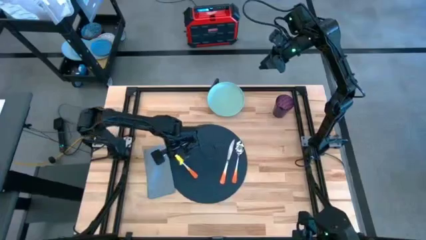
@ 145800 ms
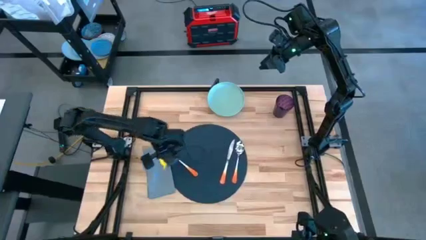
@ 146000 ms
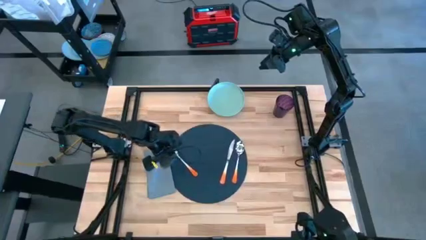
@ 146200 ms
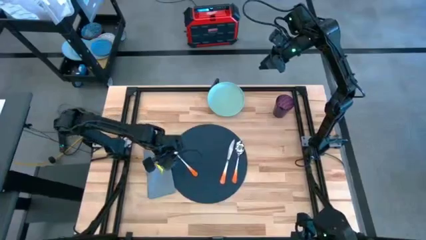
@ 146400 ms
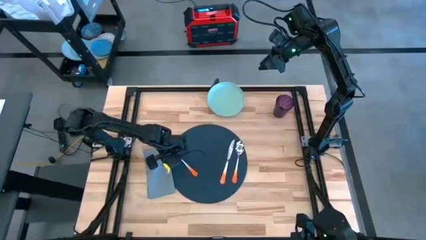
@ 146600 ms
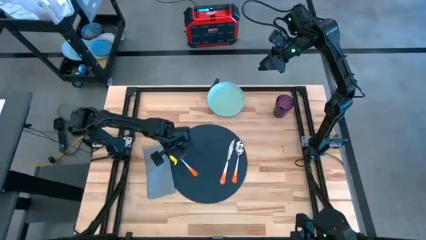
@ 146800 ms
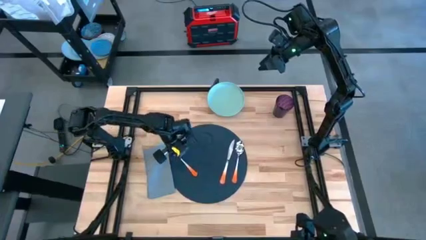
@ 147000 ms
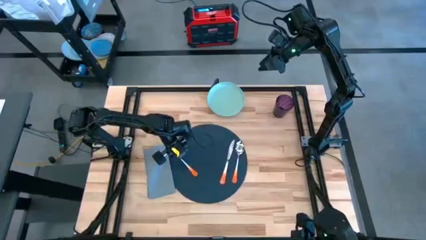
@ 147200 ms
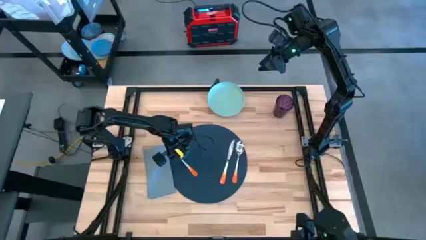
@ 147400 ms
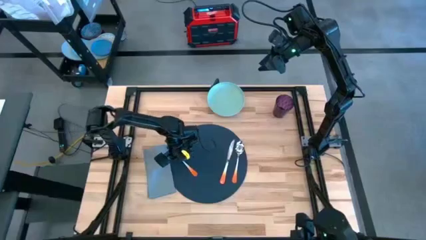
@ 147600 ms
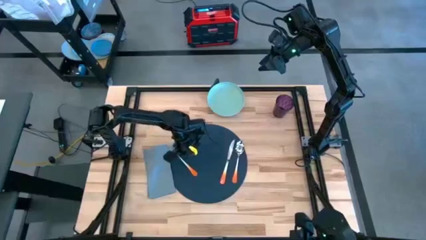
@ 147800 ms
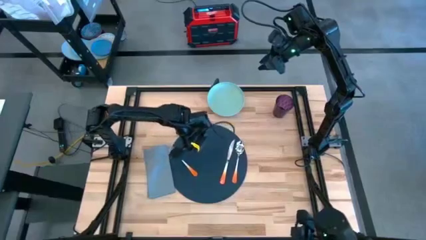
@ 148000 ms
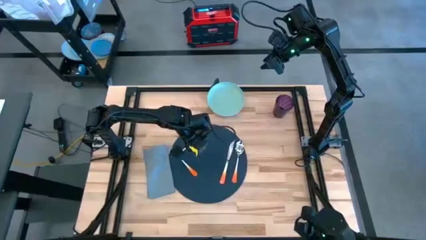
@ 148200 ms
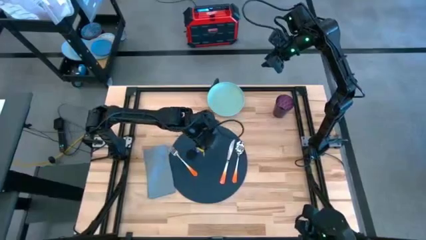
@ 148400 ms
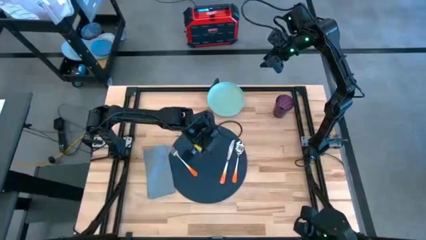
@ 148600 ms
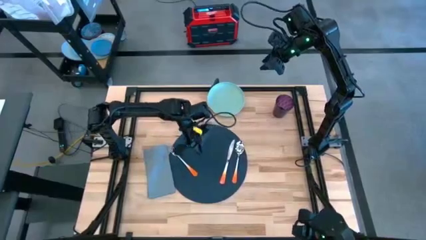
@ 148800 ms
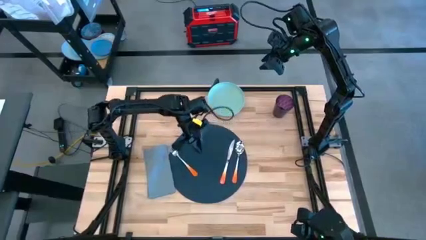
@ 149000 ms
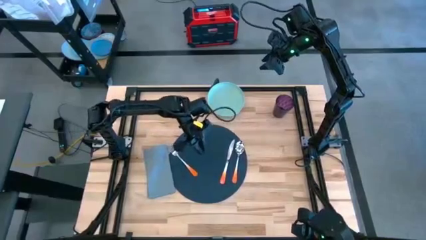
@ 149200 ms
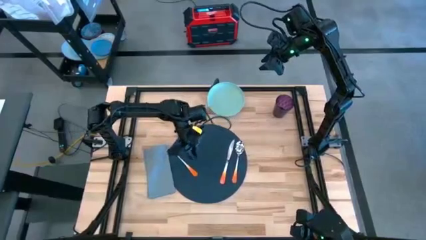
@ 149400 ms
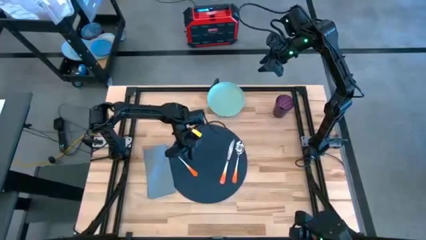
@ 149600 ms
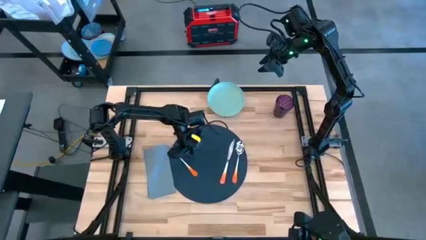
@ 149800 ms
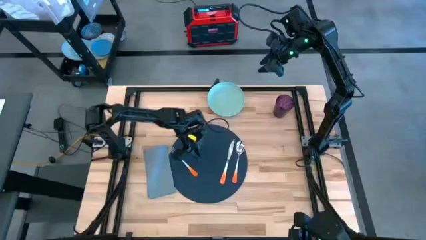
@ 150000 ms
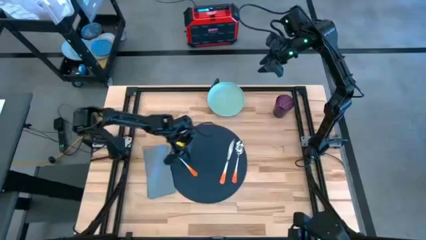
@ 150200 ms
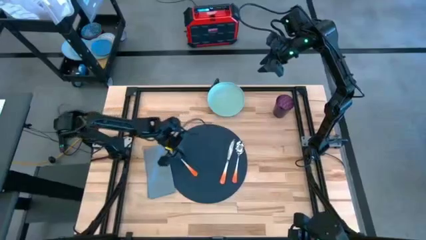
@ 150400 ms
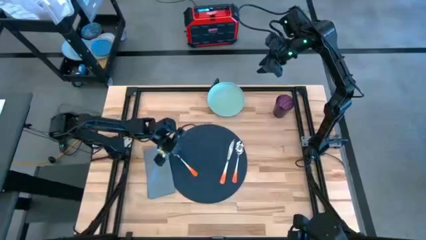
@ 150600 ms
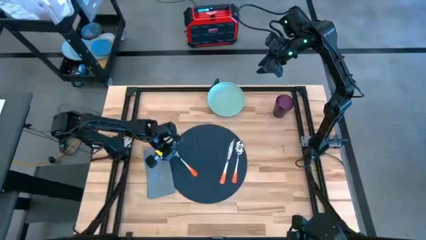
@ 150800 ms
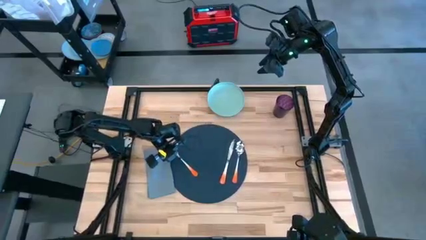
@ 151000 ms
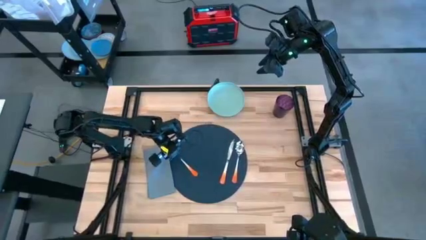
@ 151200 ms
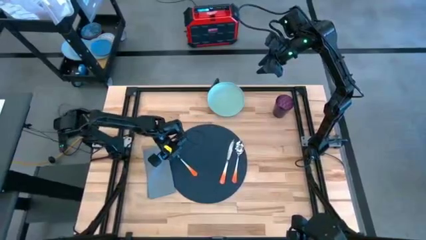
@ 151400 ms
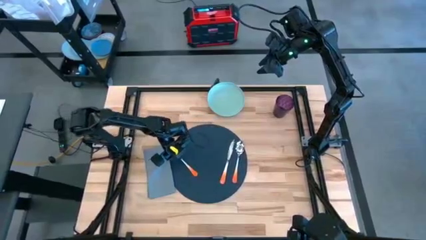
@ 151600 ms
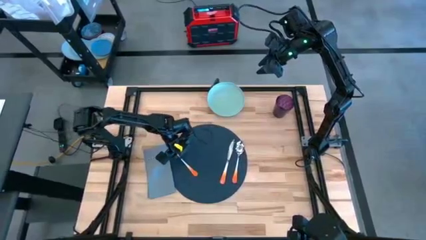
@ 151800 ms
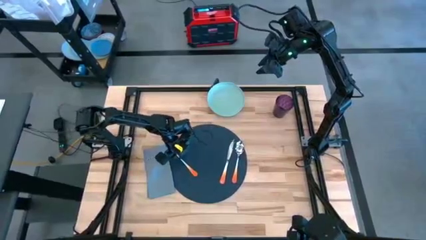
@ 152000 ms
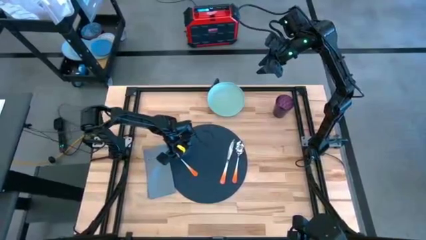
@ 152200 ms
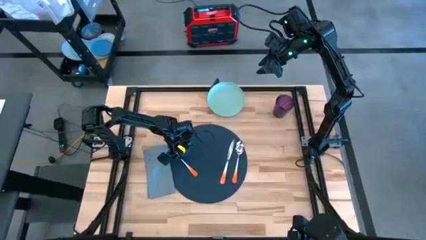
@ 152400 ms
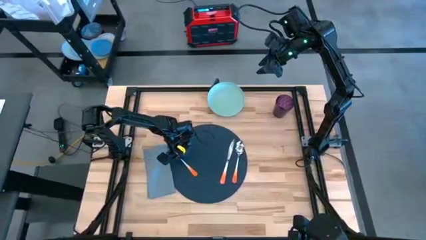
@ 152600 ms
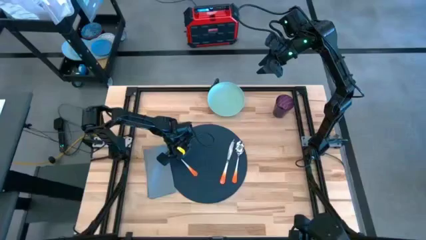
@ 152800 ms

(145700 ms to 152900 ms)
Task: Set table place
Put the orange fork on top of the gray table napkin

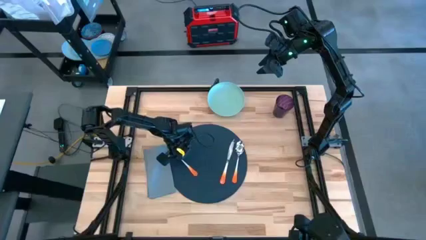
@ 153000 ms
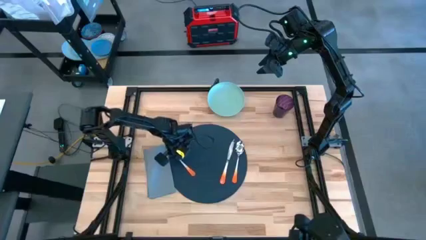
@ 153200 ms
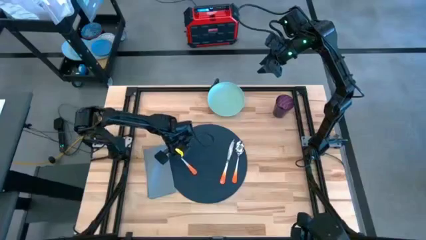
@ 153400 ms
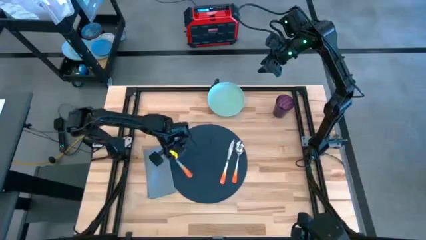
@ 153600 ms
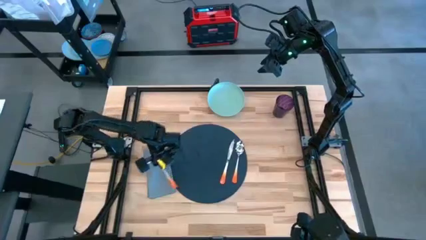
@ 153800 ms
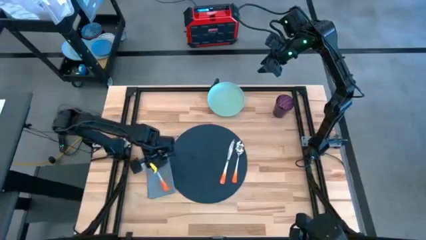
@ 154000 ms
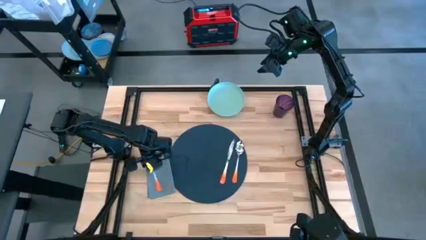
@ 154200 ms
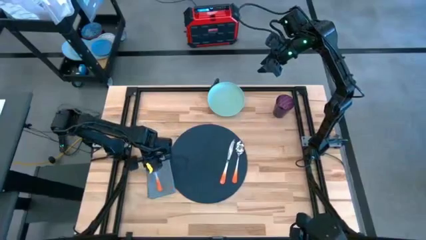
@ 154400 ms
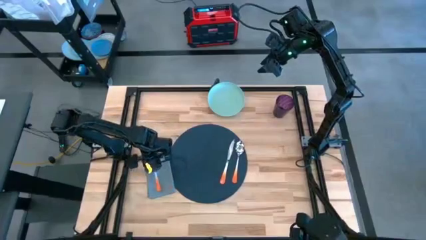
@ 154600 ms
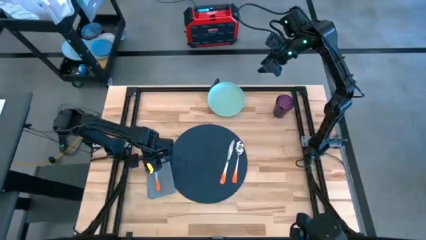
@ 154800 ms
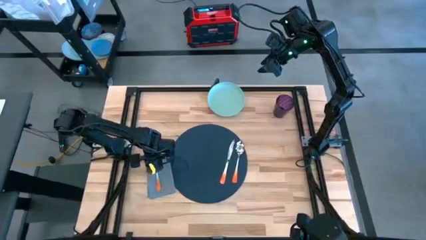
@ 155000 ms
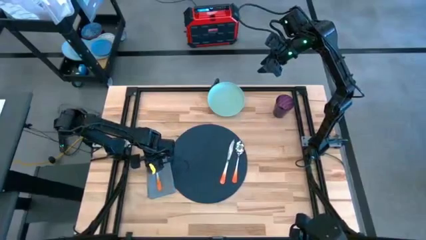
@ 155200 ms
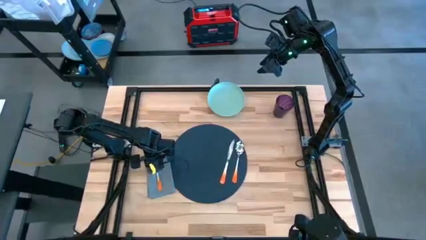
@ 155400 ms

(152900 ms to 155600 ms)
Put the orange fork on the gray napkin to the left woven placement

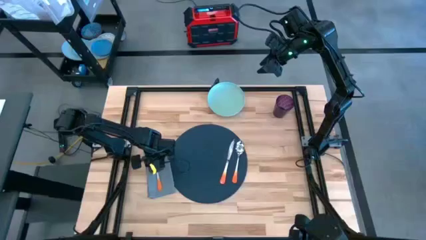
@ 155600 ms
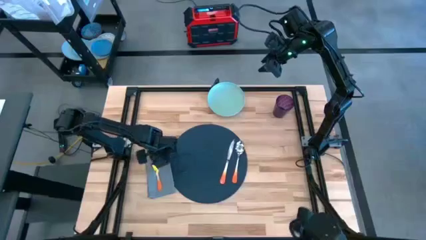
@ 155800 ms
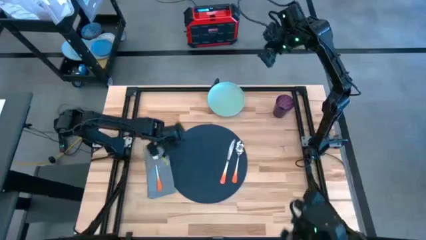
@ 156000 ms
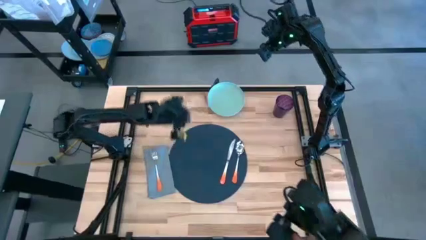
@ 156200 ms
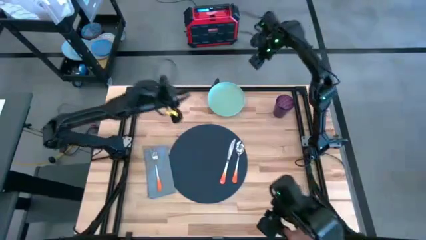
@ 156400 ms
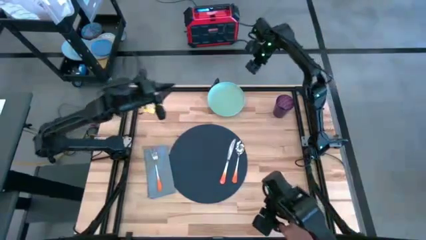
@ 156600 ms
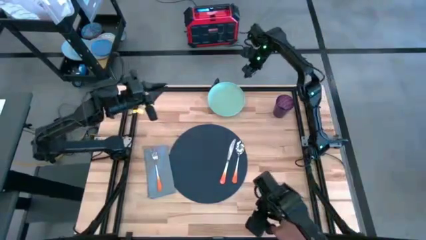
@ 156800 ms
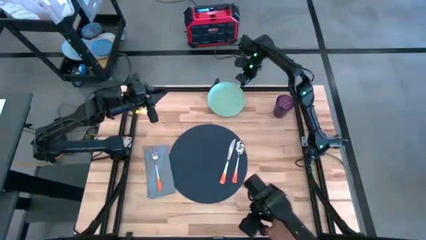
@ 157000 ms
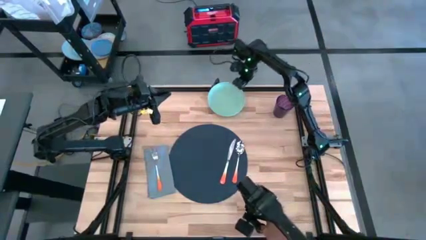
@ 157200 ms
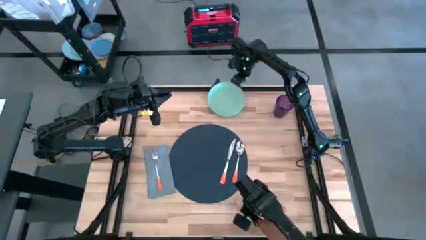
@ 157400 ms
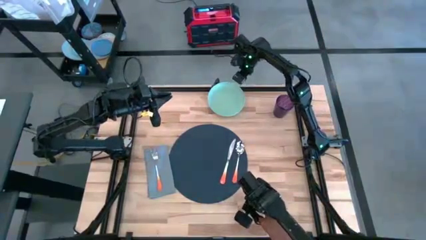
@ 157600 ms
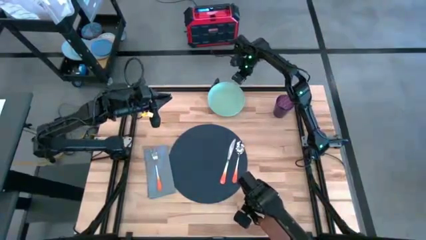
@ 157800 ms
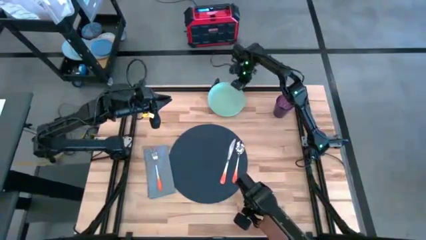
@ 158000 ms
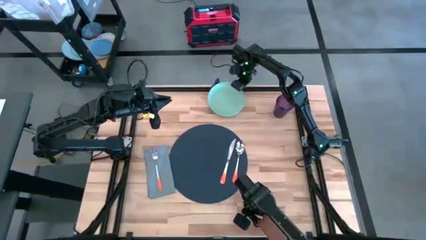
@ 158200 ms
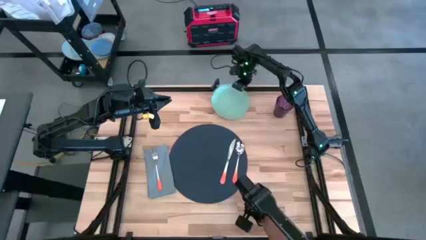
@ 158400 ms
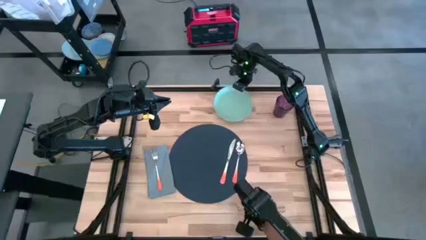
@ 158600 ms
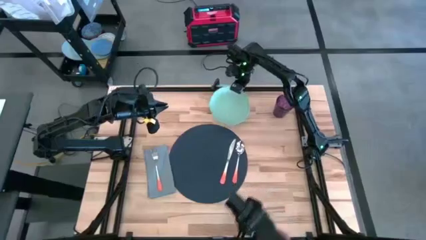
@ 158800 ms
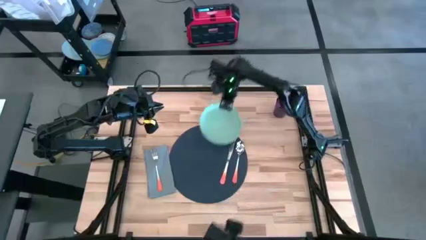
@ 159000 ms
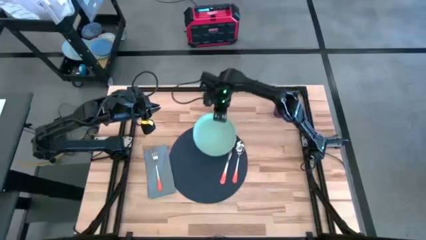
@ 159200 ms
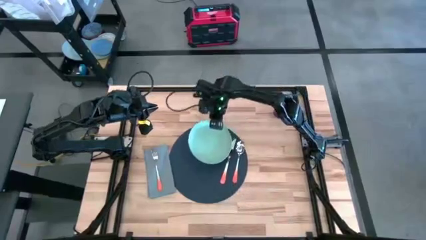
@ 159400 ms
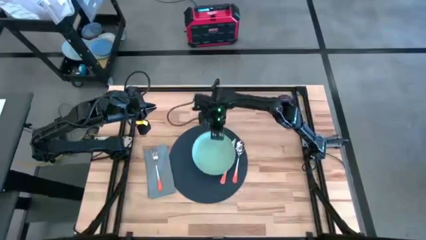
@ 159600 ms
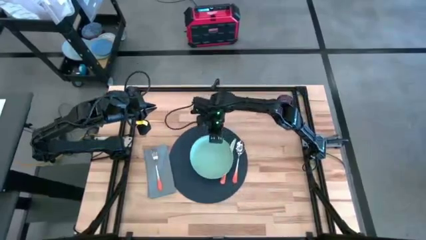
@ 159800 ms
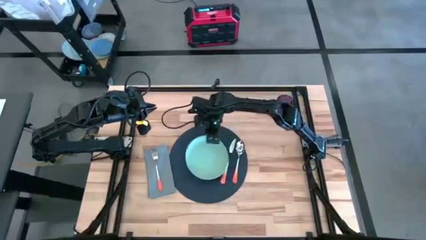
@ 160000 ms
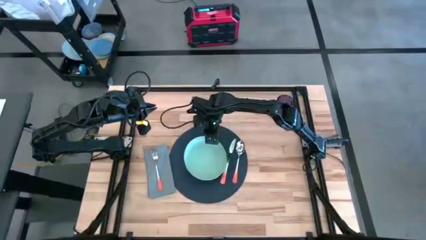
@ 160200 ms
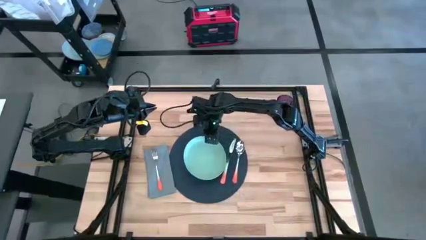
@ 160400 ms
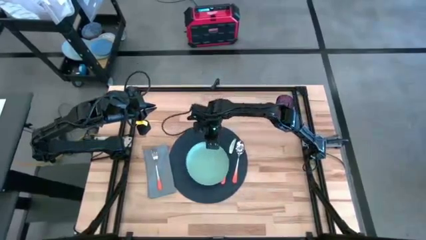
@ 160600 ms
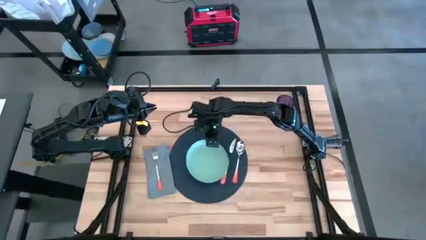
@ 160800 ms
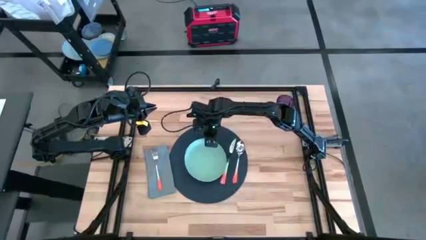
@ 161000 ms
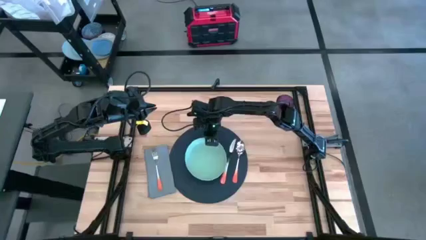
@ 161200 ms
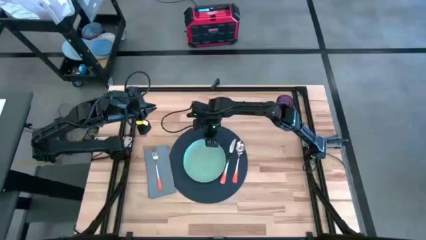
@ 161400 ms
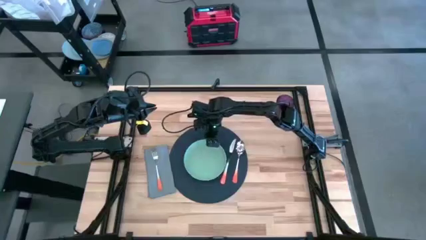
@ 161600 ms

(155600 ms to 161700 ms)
Put the green plate on the dark gray placemat to the left of the orange table knife
